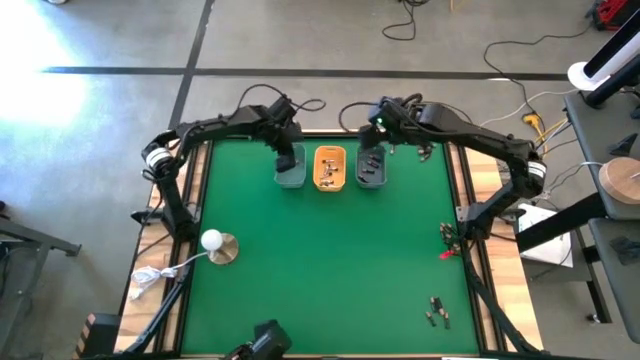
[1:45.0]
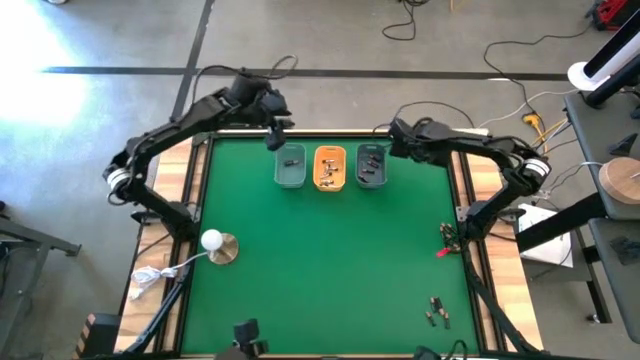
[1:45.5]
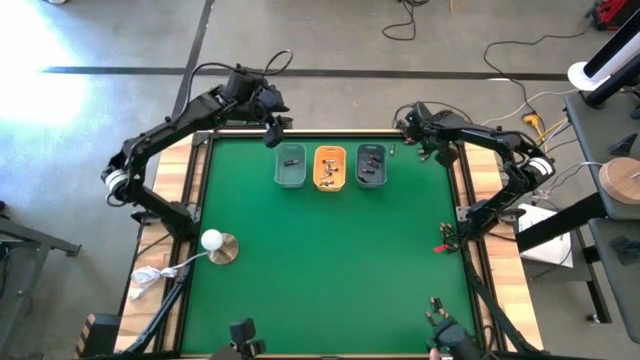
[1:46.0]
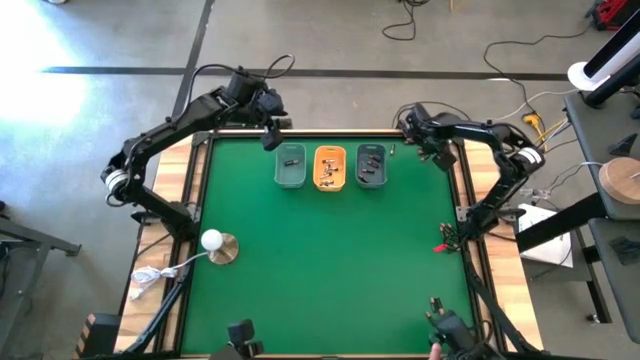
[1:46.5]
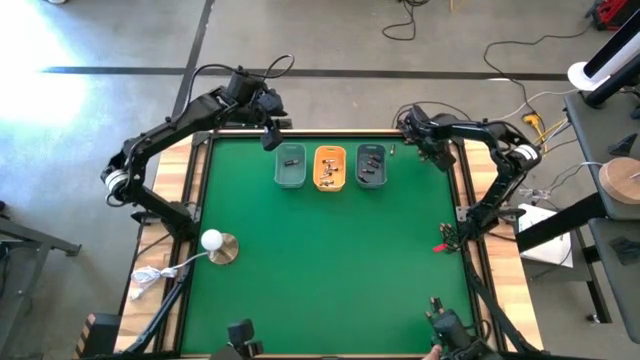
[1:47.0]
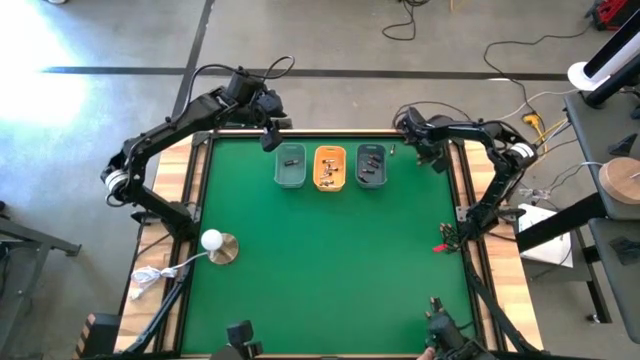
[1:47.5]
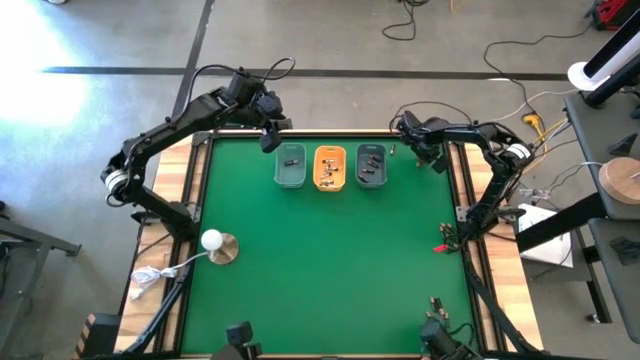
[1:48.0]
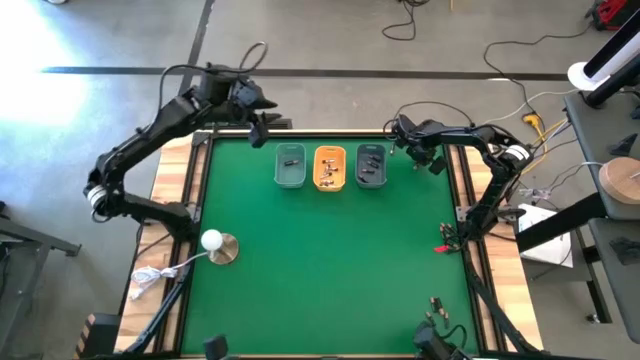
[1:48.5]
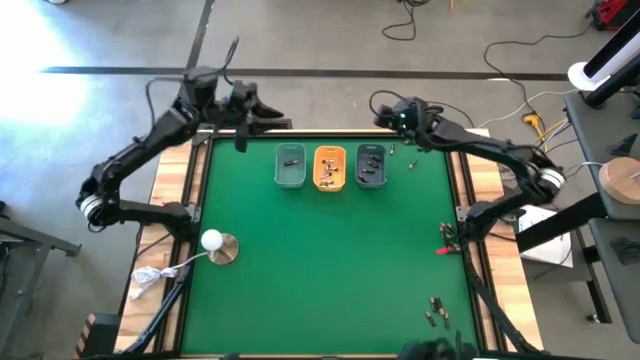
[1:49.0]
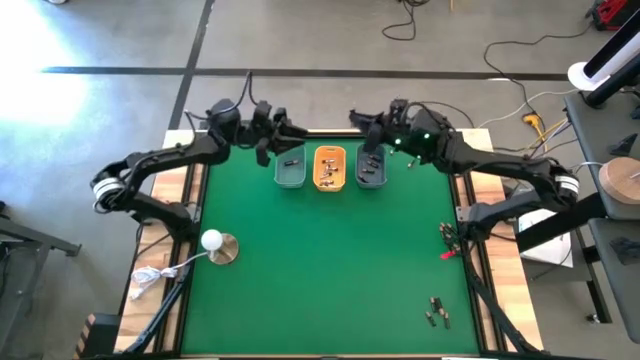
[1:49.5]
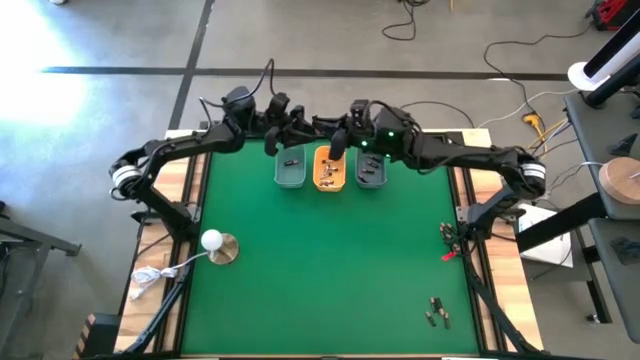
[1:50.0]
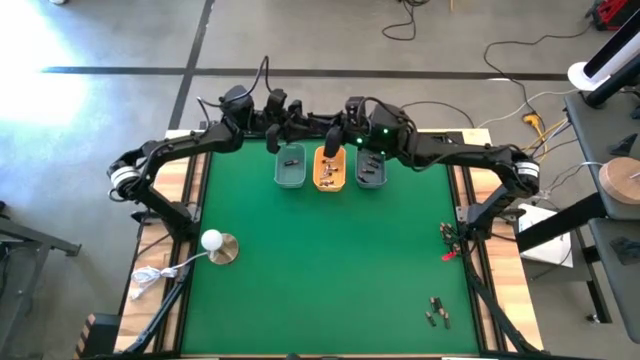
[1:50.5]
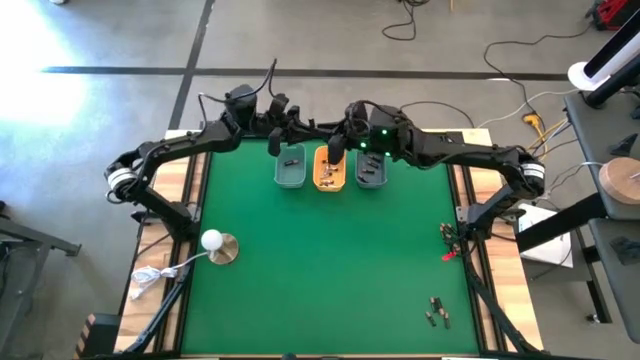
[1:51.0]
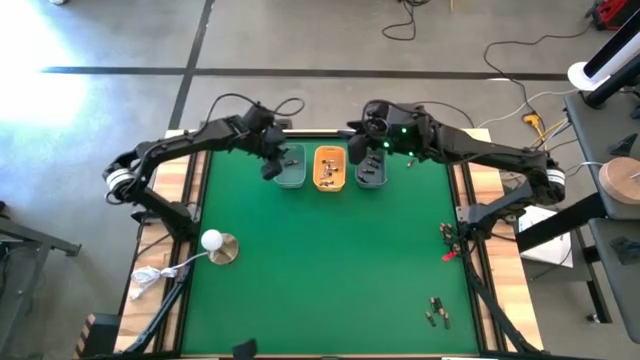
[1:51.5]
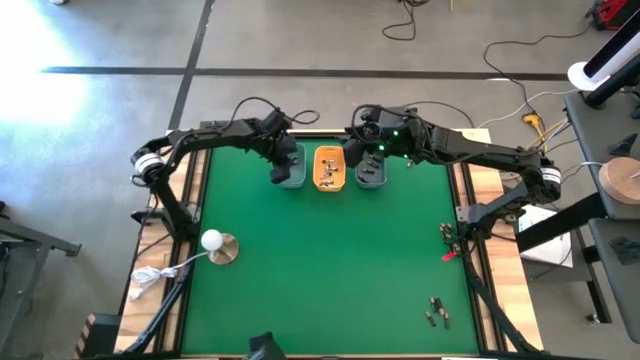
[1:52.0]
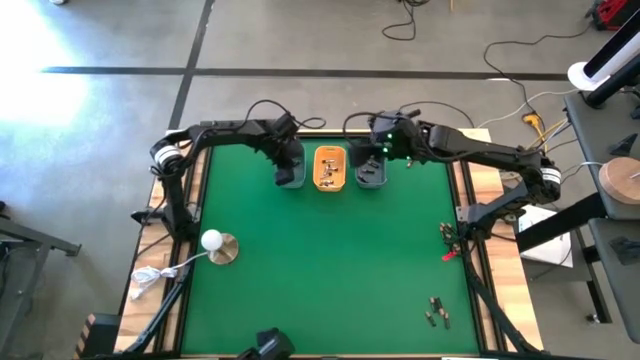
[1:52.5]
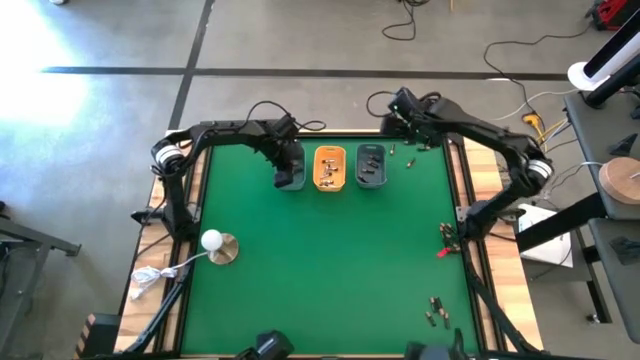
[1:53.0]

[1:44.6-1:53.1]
Task: Sort batteries
Put the big brown battery into the green bin

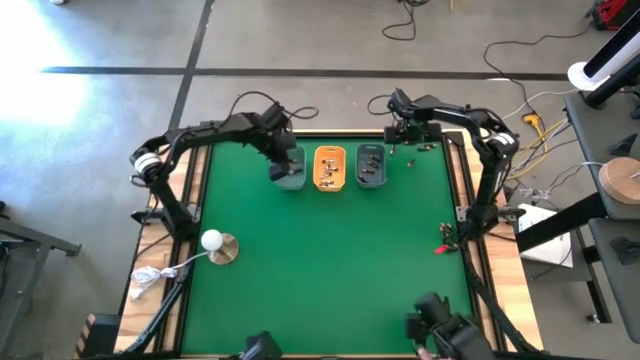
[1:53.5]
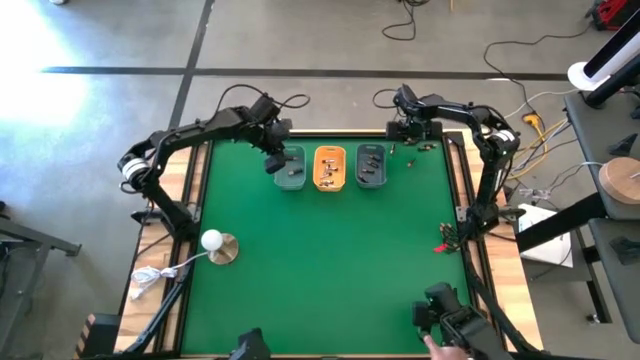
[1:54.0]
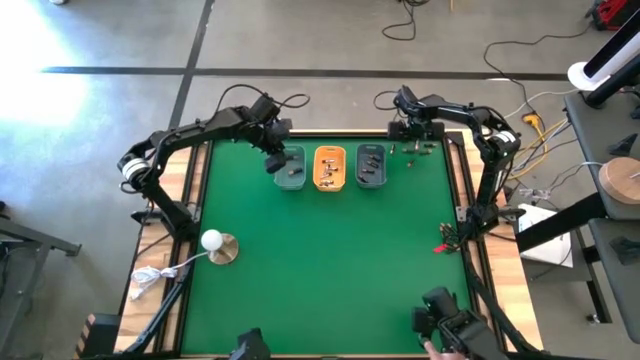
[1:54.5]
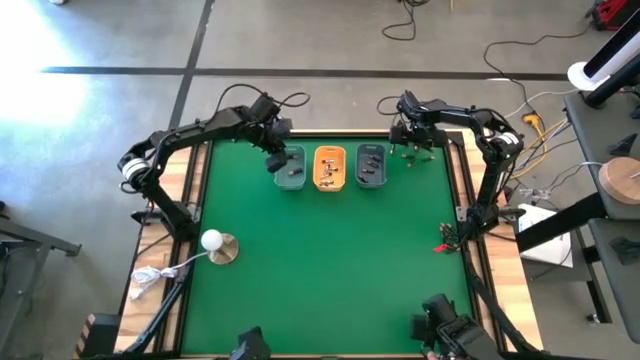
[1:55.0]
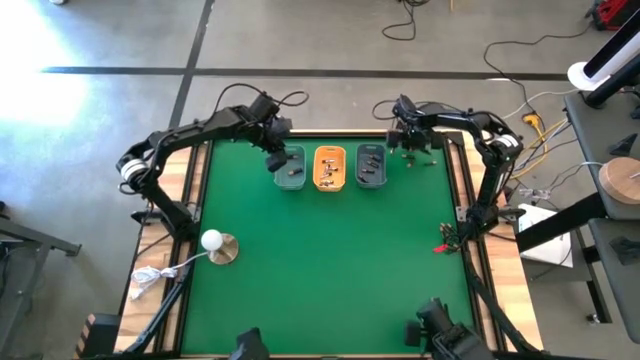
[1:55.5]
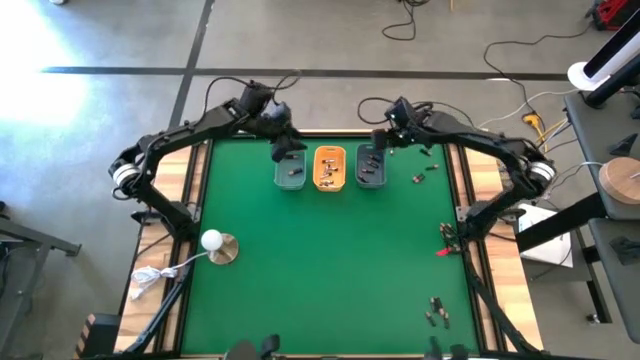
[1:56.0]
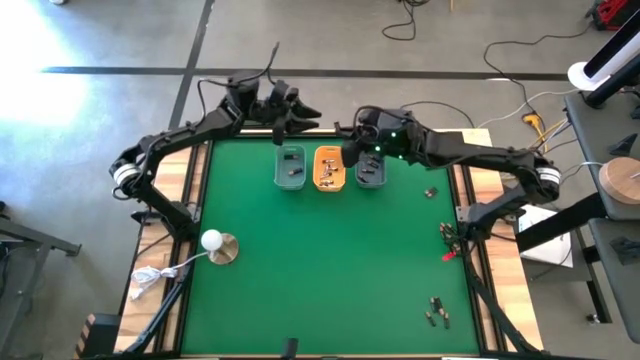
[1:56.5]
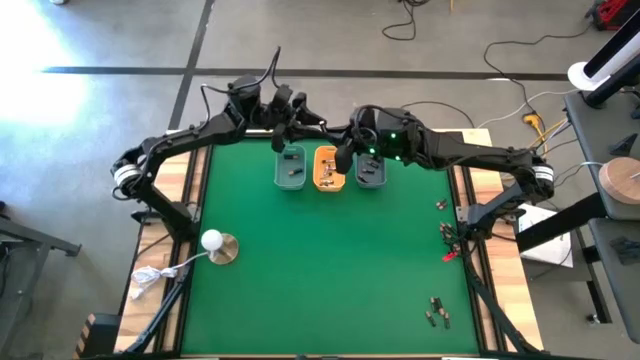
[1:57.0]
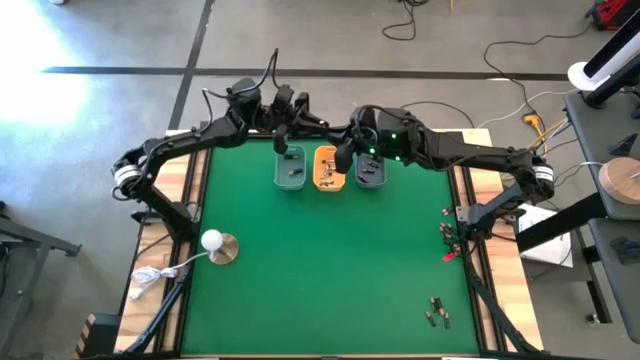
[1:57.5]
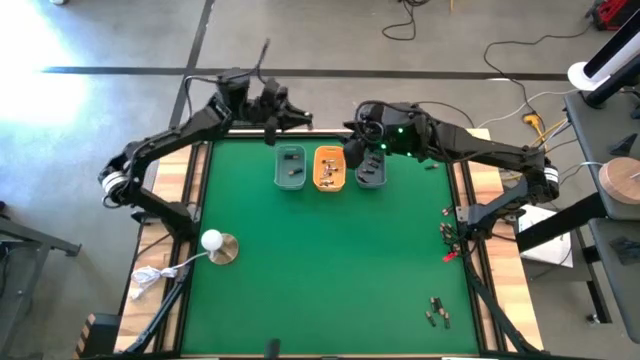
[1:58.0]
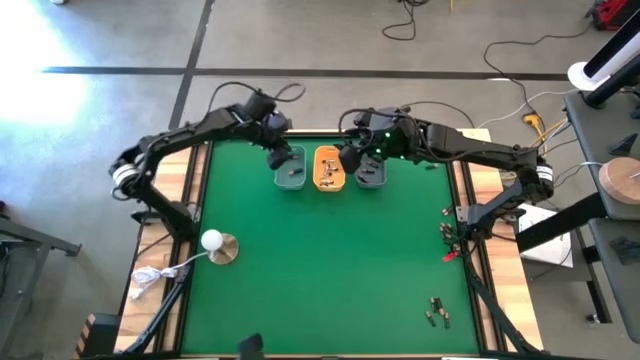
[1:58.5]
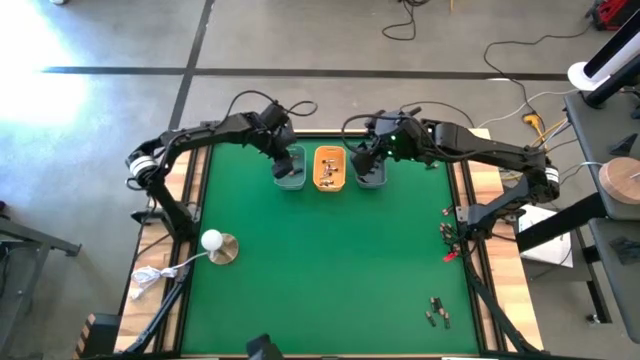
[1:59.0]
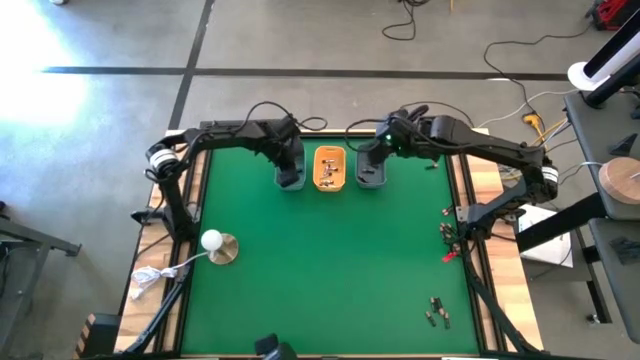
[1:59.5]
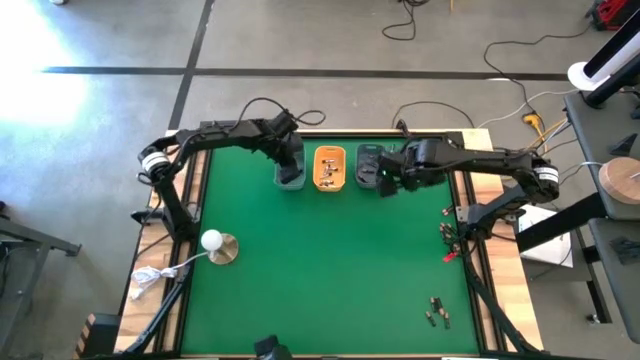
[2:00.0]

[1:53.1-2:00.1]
Put the big brown battery into the green bin

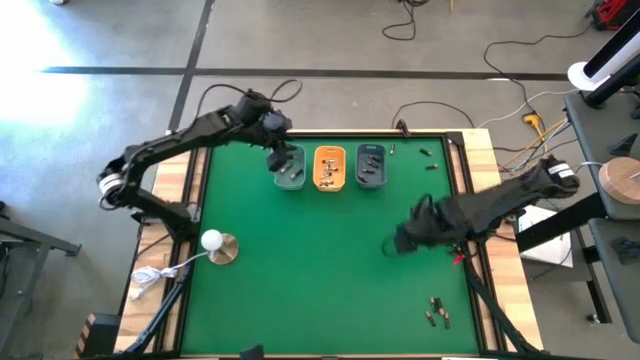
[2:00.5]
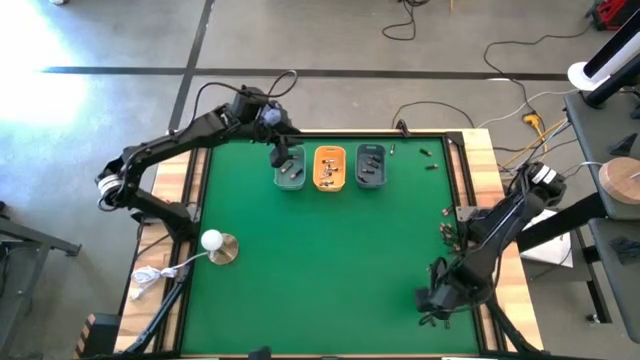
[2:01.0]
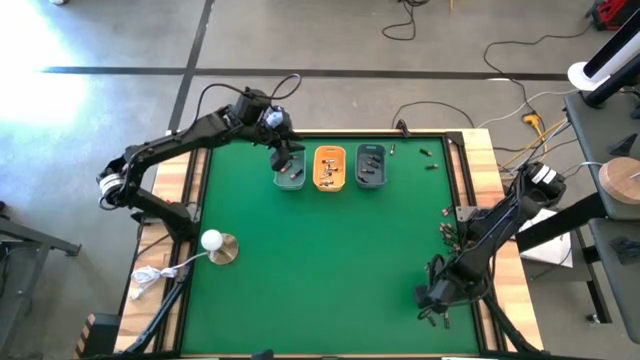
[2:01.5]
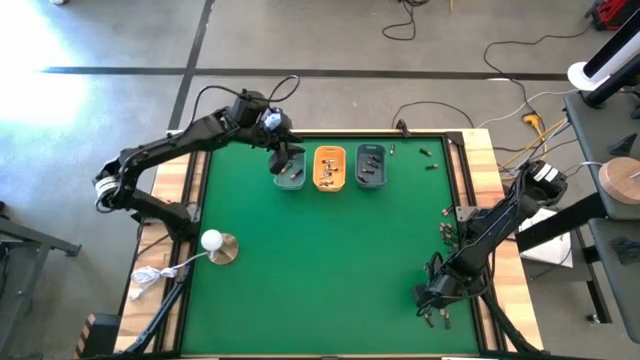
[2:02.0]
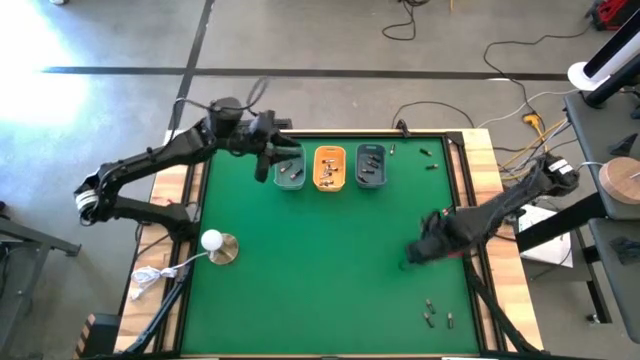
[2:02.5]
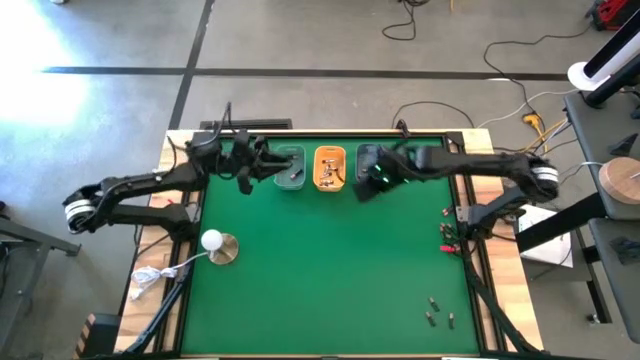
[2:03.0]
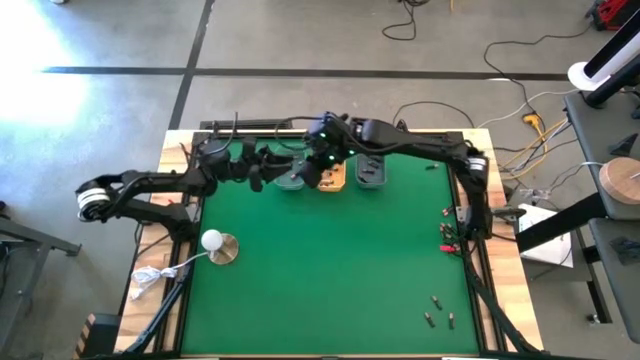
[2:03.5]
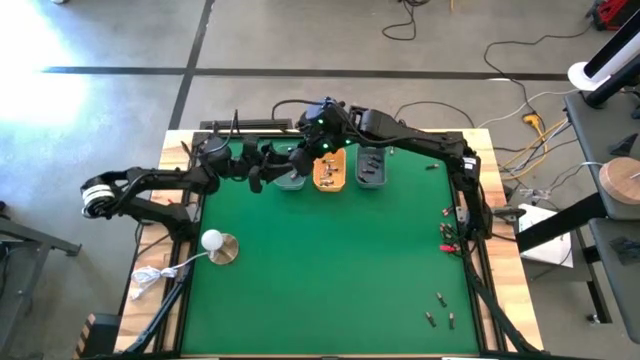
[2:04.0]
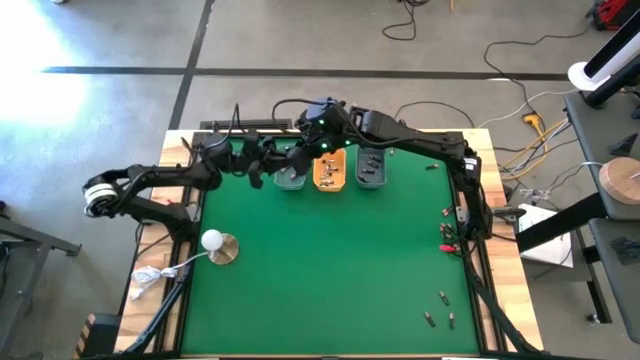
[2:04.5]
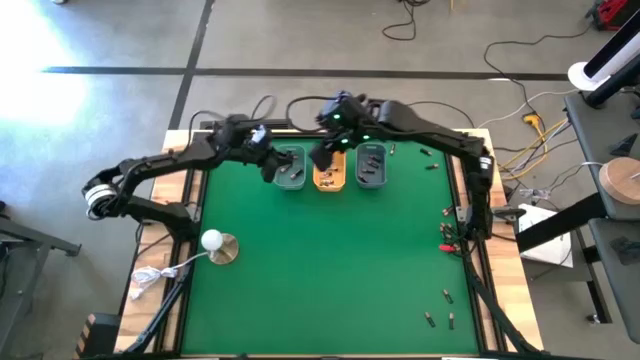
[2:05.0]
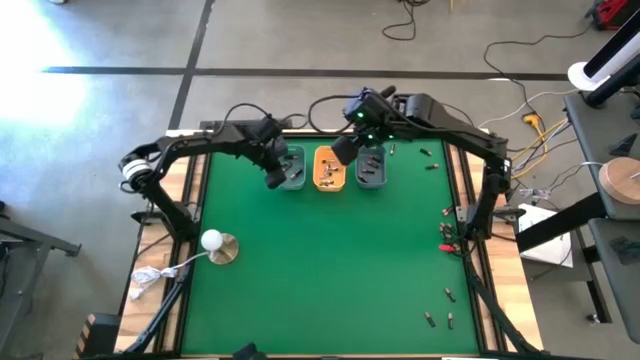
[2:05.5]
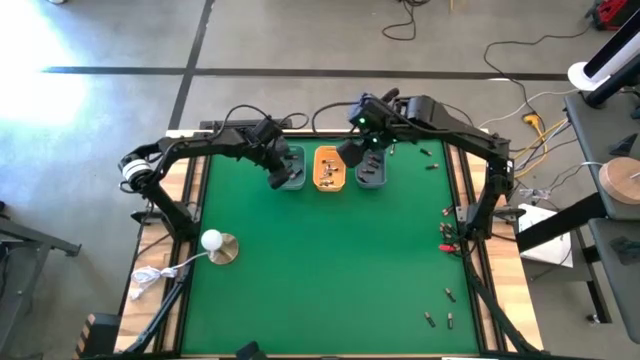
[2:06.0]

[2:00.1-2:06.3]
Put the big brown battery into the green bin
